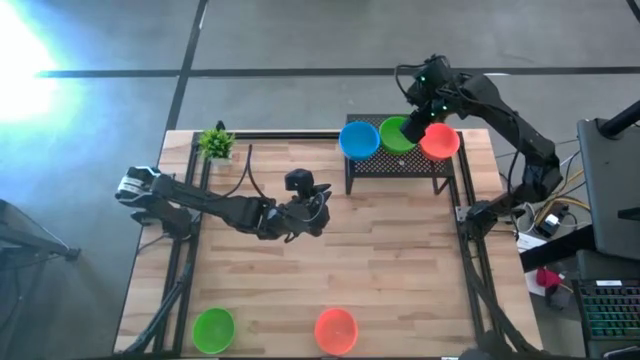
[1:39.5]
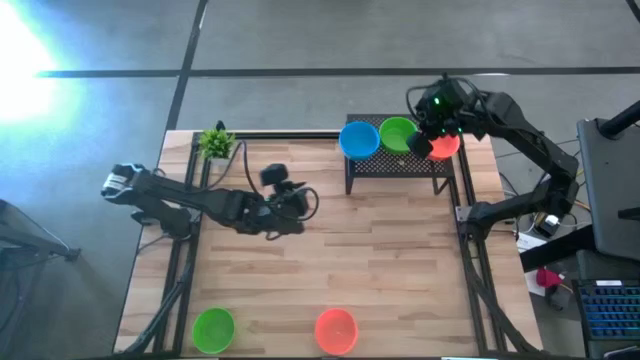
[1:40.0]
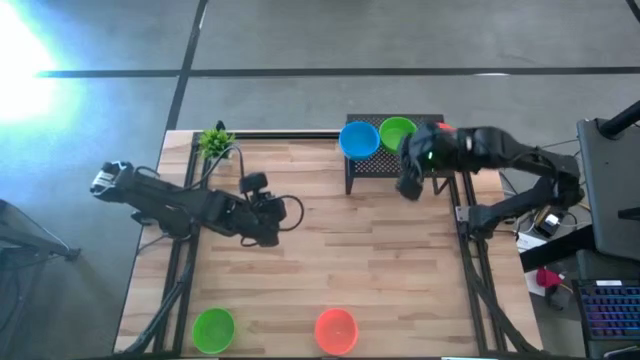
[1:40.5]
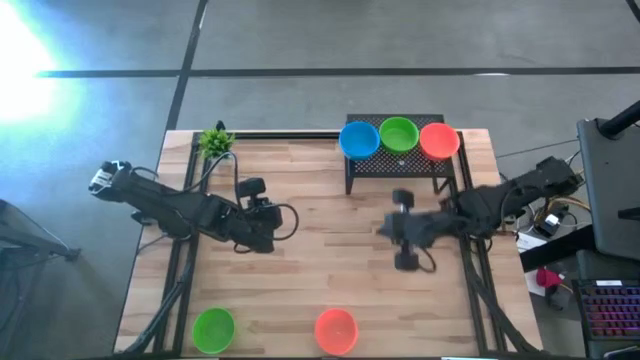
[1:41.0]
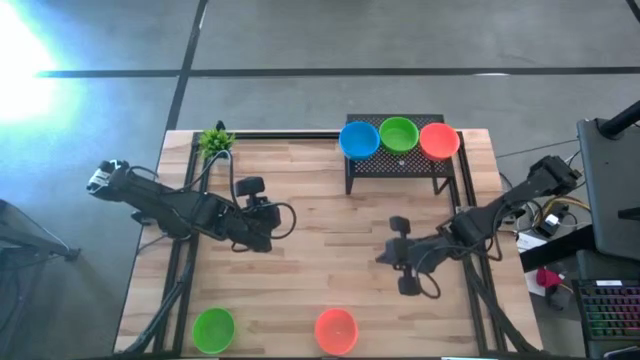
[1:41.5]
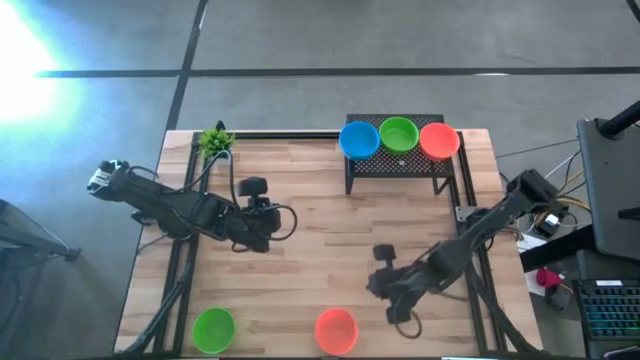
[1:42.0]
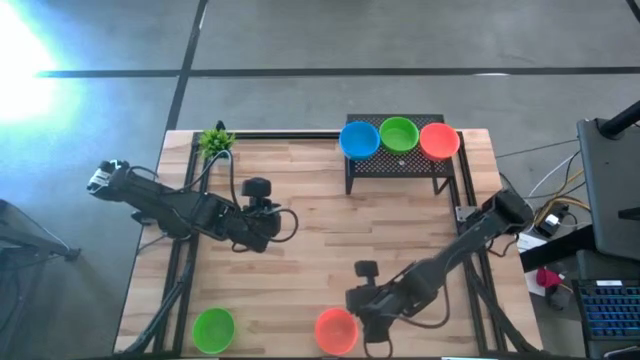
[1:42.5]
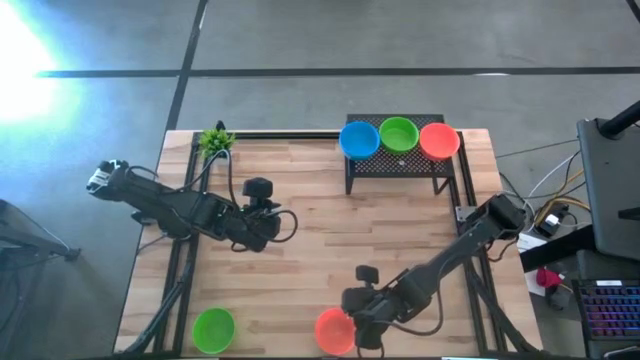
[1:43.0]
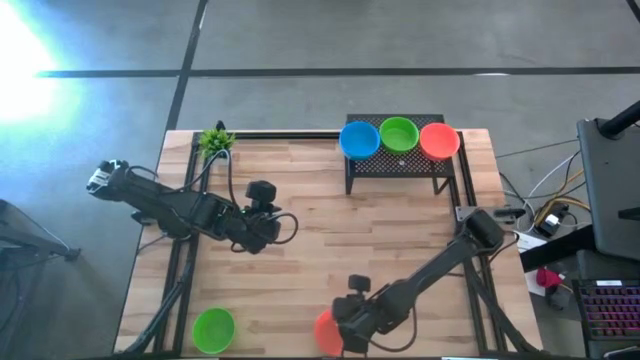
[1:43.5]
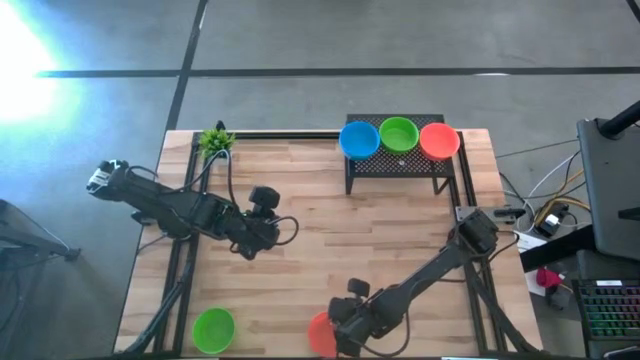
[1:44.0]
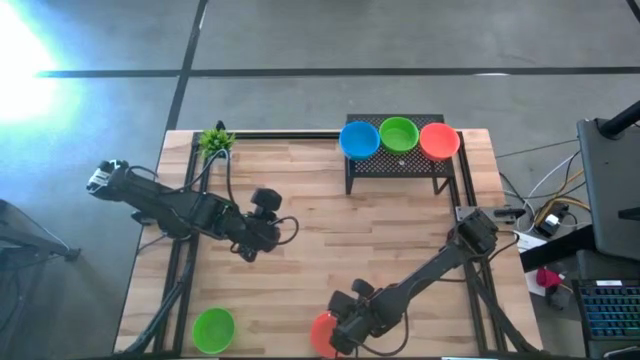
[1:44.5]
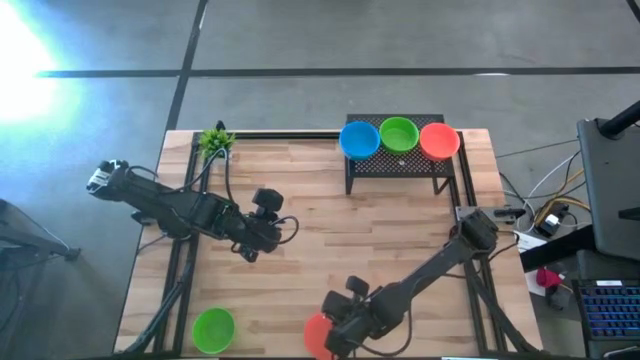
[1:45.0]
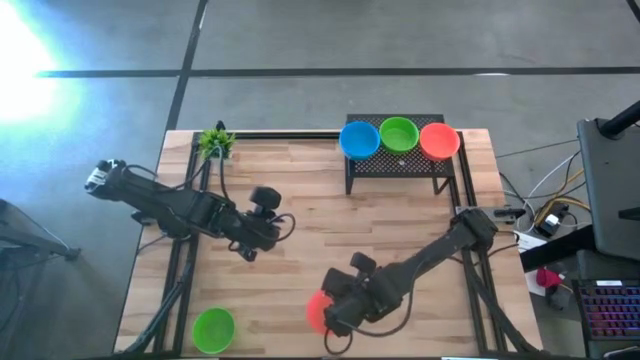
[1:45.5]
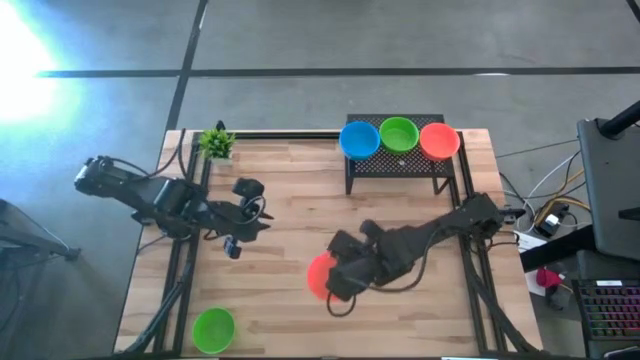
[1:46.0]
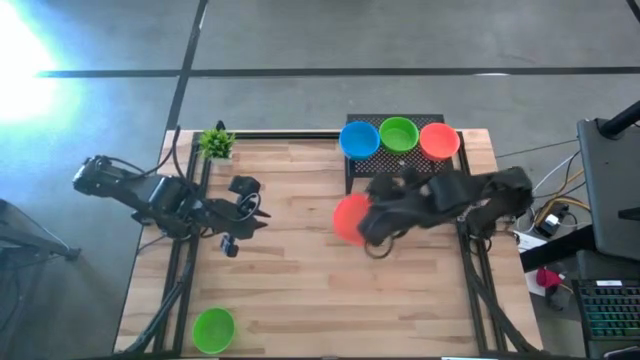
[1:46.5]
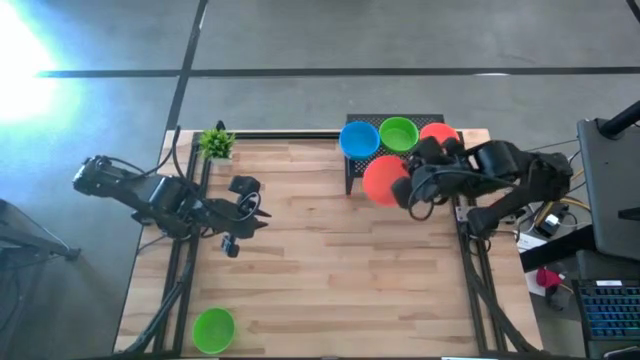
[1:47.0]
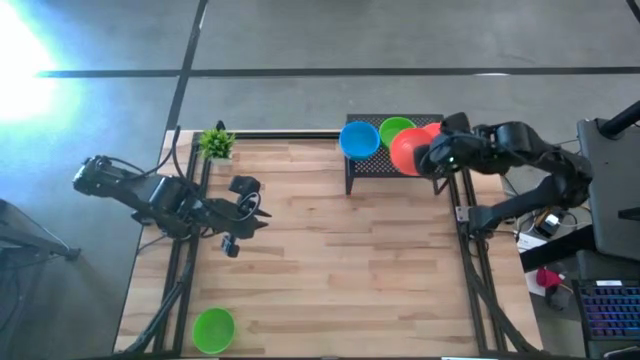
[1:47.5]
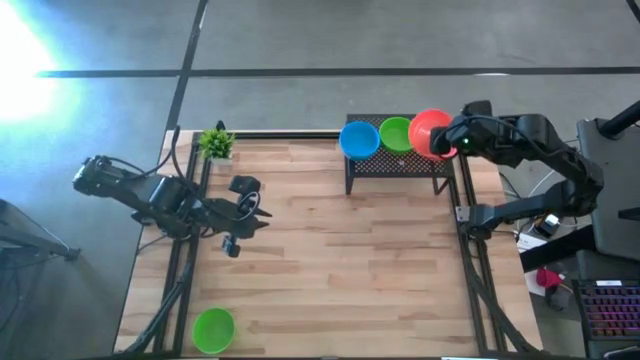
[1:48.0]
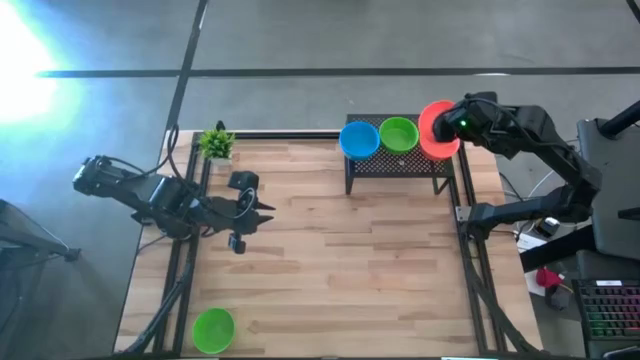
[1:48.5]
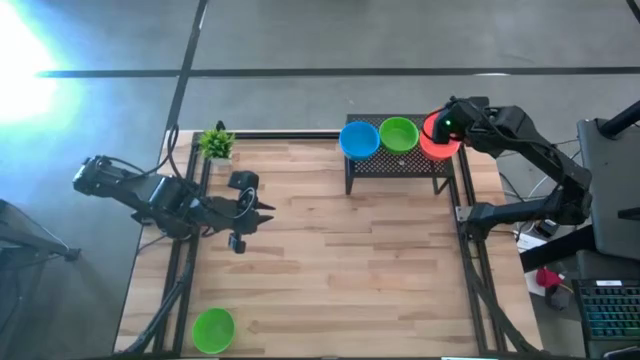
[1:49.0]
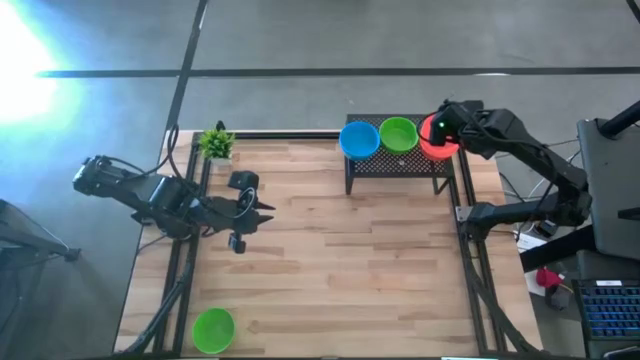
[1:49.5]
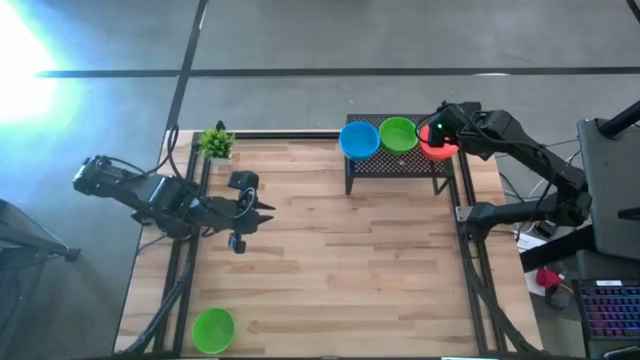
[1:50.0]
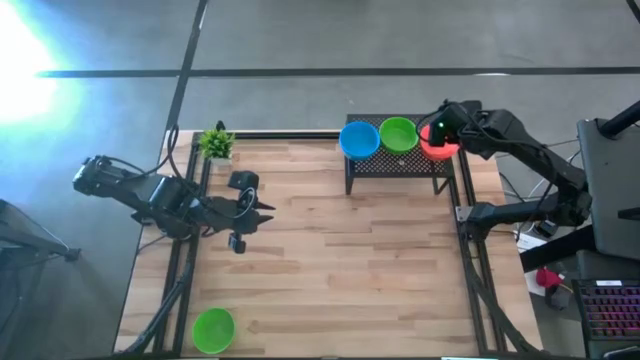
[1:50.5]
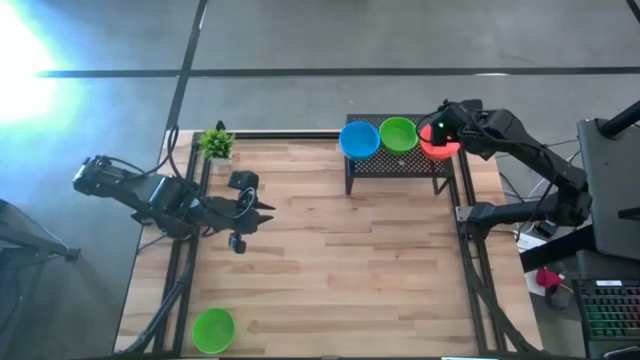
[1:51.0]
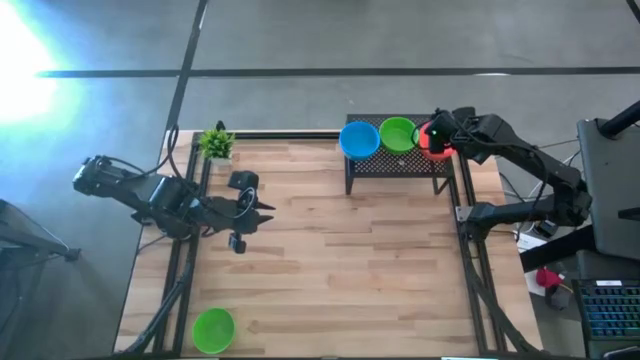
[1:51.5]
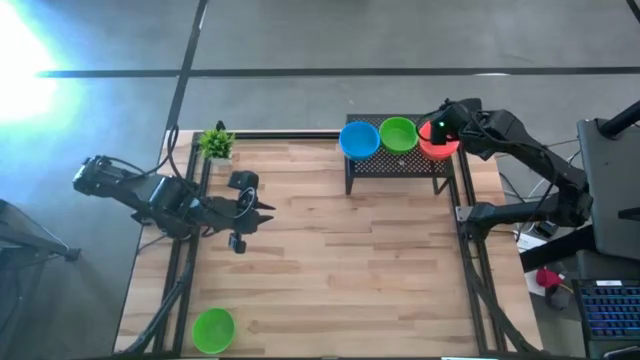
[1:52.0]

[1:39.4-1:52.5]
Task: Pick & Place Mini bowls
Stack the orange bowl on the orange bowl on the shelf

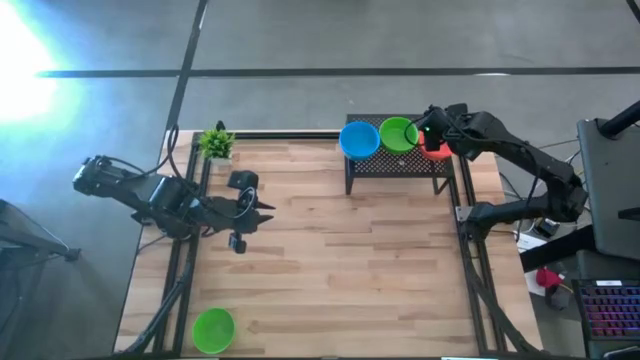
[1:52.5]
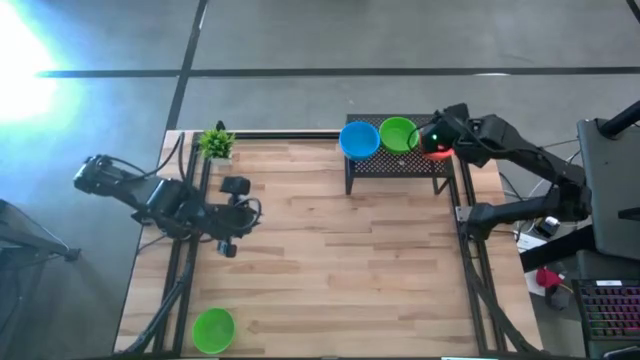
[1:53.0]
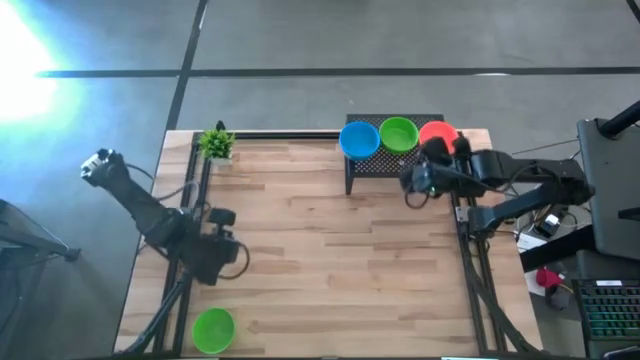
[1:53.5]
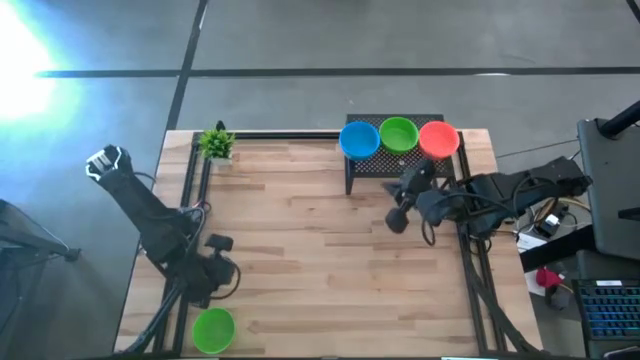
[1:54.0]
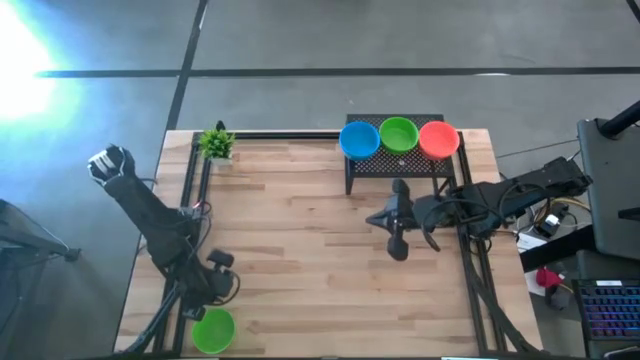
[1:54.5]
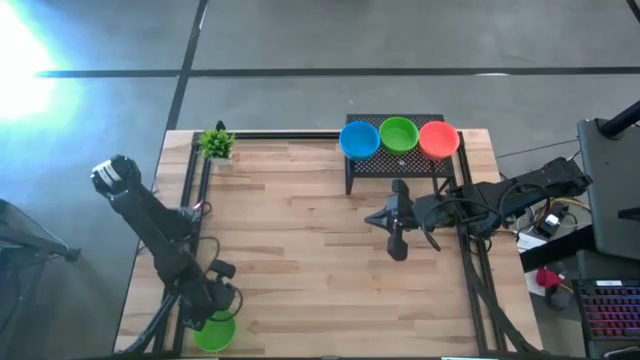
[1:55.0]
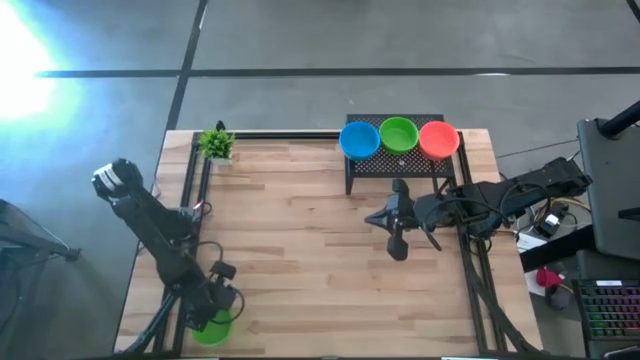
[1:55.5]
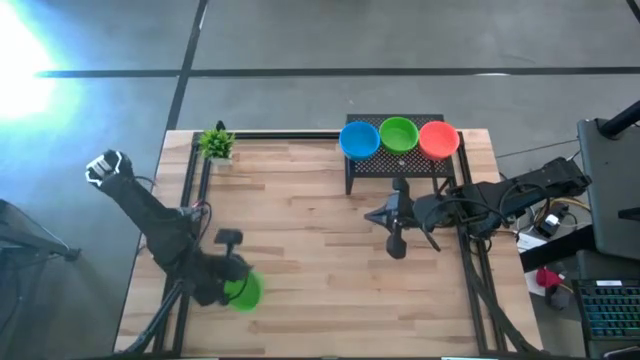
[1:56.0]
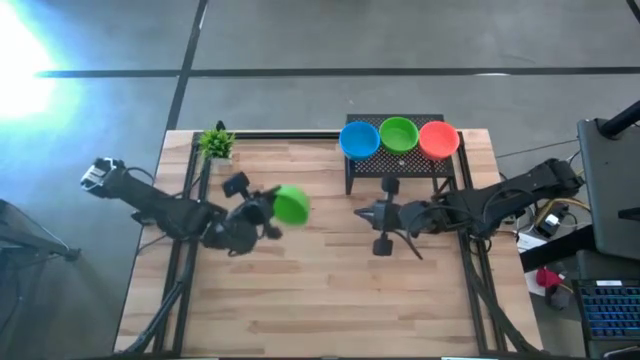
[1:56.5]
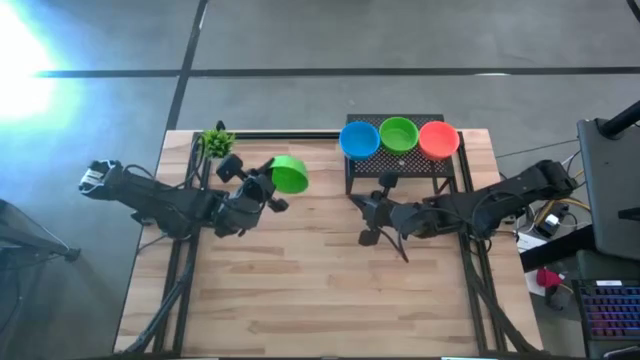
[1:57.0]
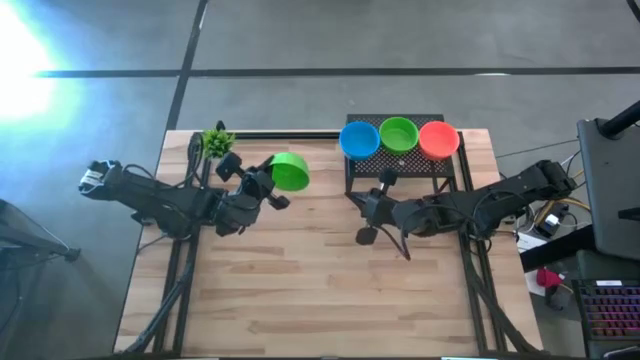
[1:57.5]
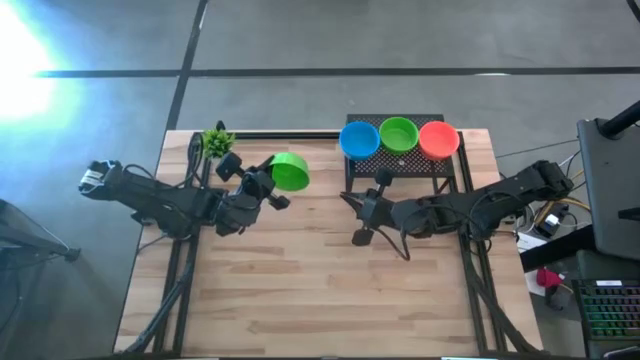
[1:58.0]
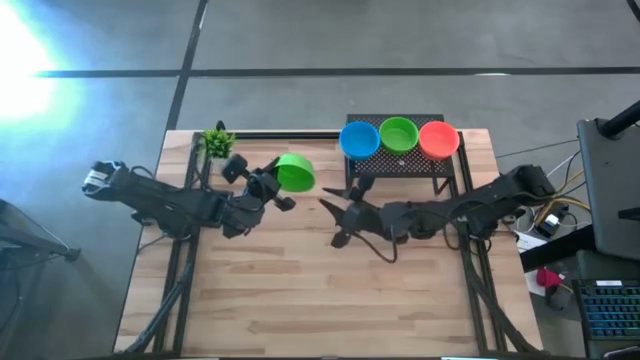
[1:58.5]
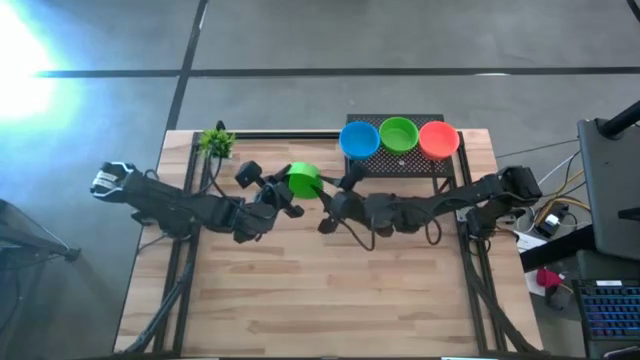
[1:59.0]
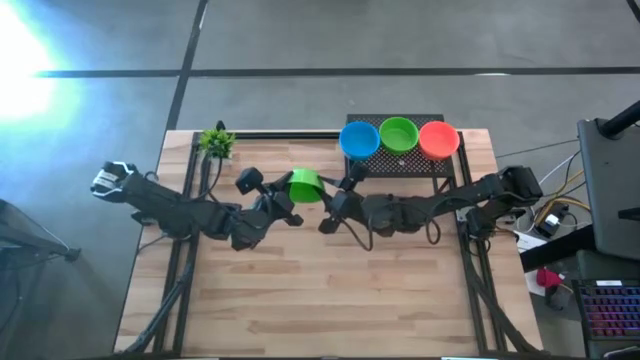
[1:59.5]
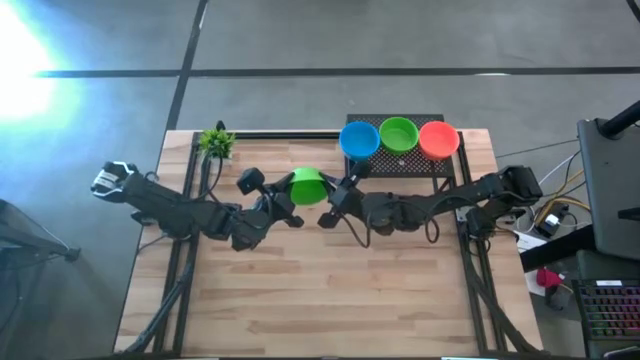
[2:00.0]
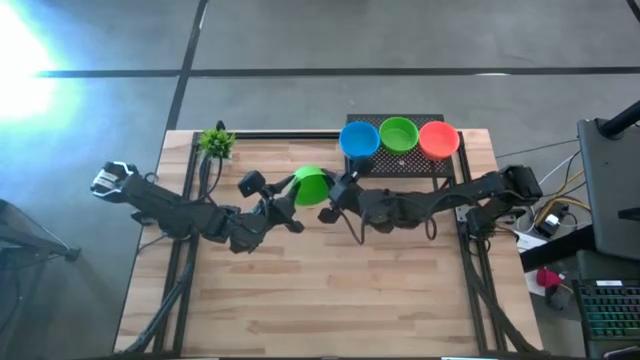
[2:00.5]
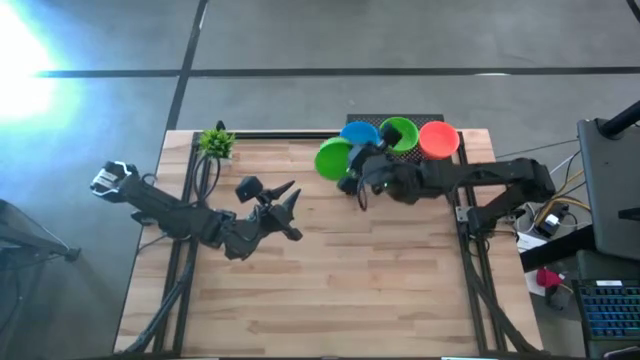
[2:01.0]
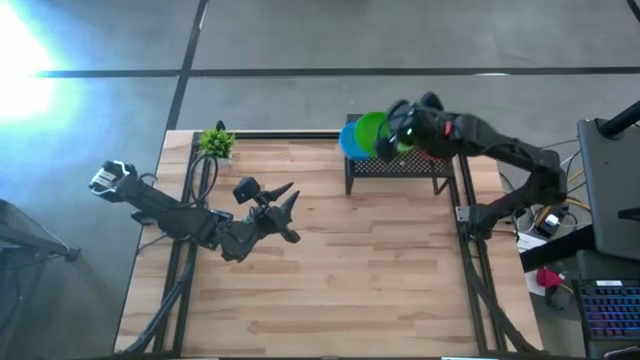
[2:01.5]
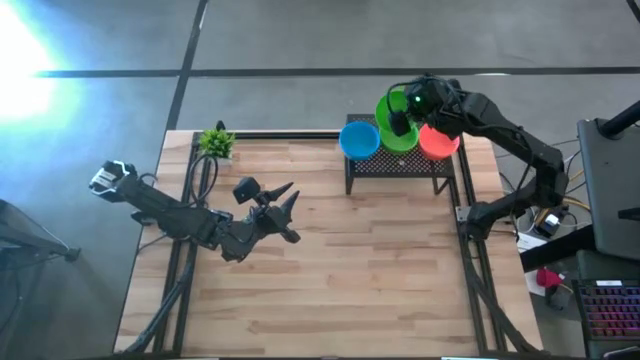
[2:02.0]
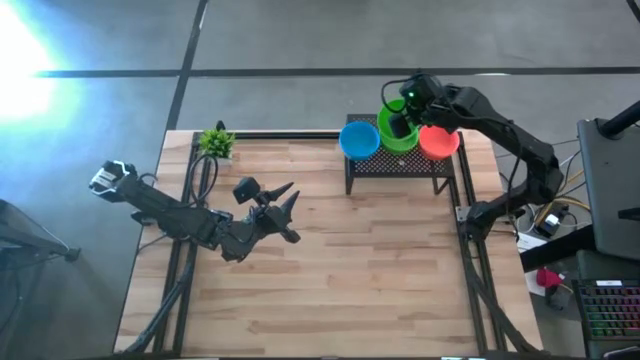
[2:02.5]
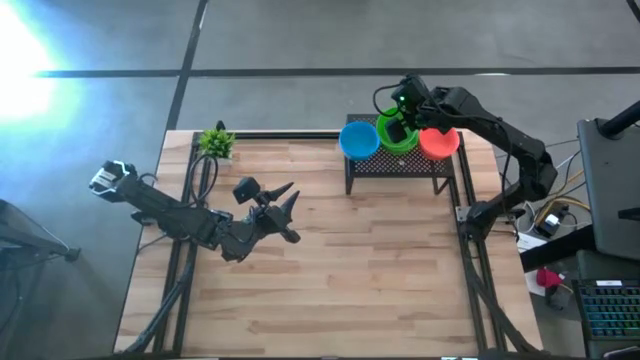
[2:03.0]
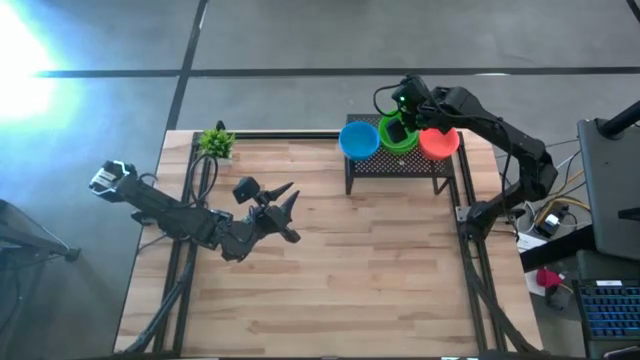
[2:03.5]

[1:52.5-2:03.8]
Stack the green bowl on the green bowl on the shelf
